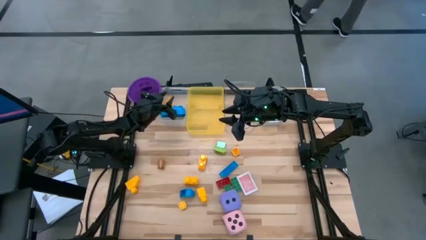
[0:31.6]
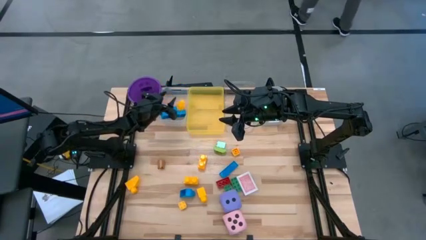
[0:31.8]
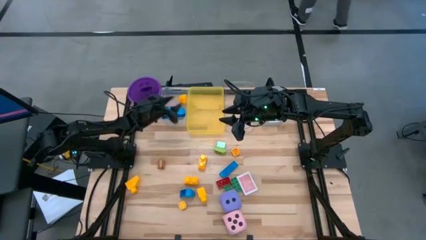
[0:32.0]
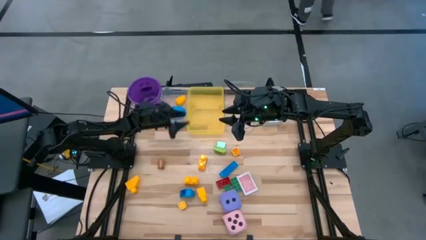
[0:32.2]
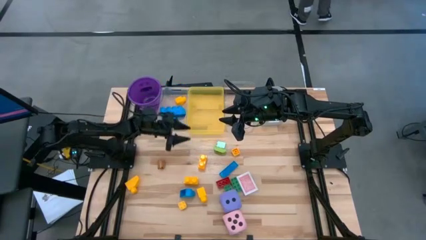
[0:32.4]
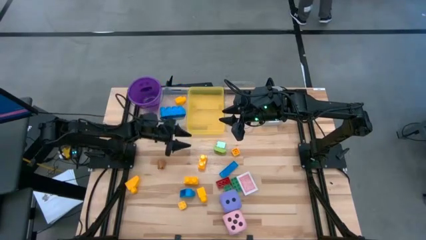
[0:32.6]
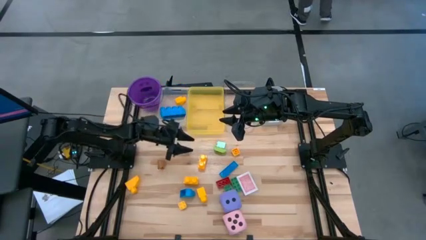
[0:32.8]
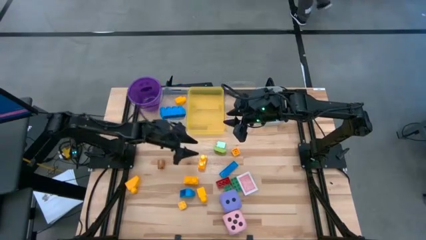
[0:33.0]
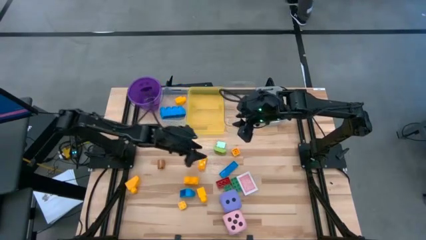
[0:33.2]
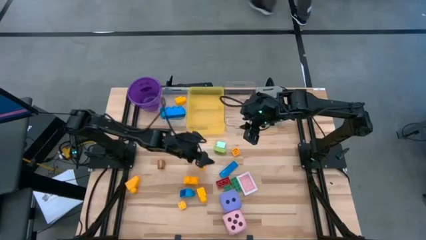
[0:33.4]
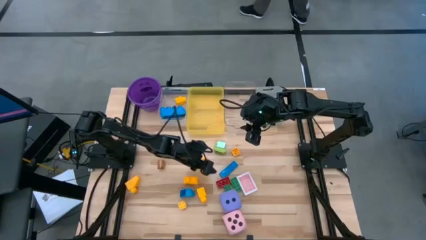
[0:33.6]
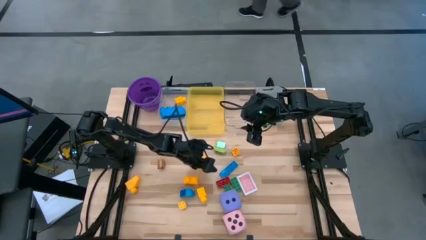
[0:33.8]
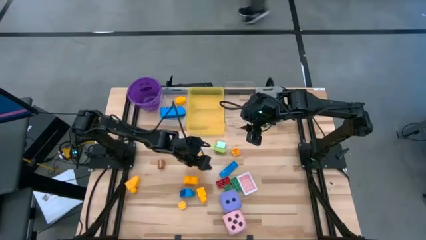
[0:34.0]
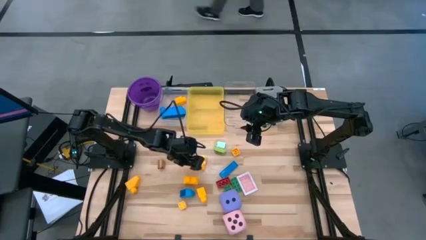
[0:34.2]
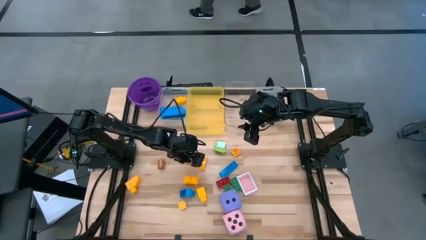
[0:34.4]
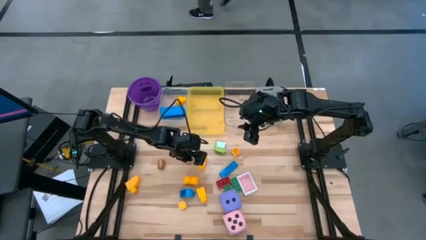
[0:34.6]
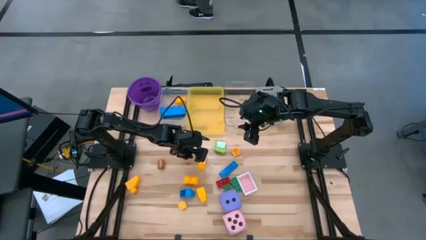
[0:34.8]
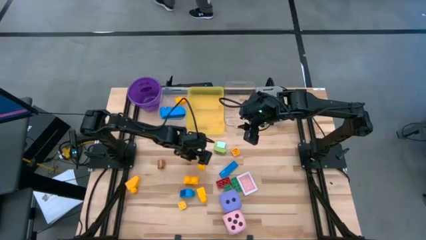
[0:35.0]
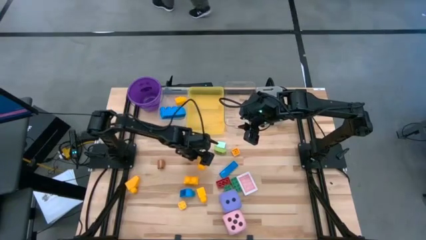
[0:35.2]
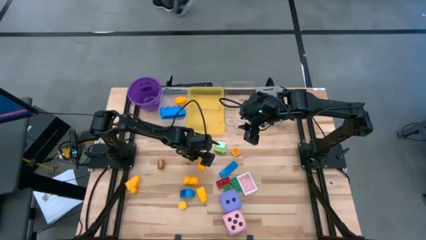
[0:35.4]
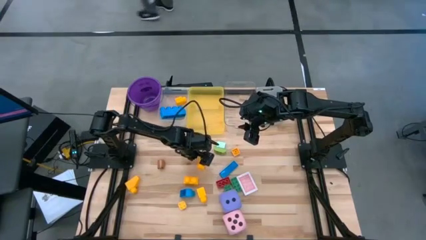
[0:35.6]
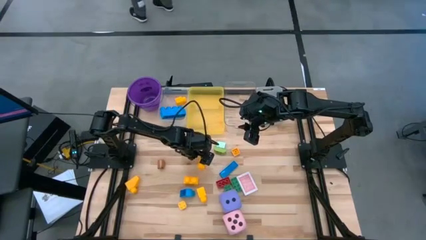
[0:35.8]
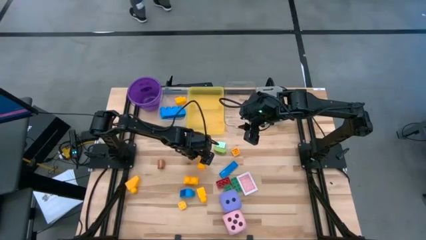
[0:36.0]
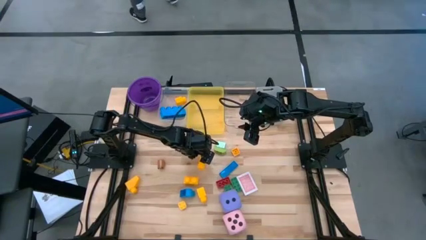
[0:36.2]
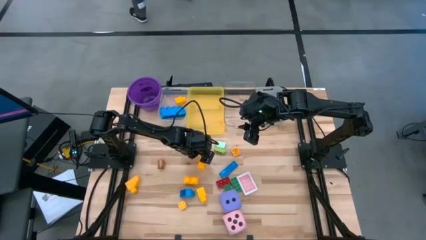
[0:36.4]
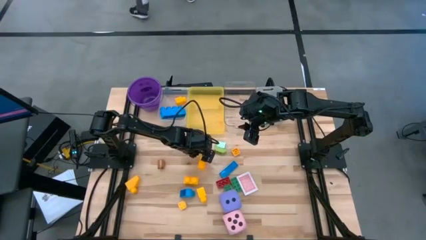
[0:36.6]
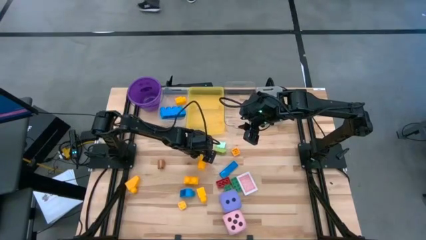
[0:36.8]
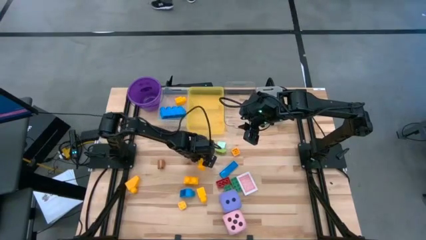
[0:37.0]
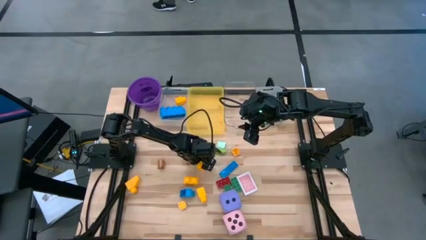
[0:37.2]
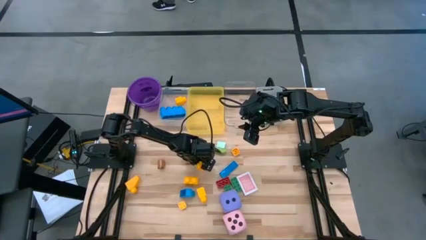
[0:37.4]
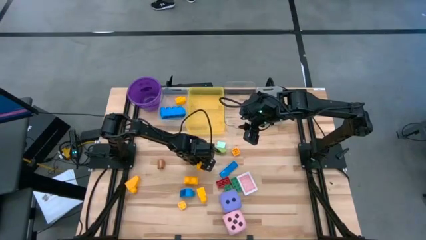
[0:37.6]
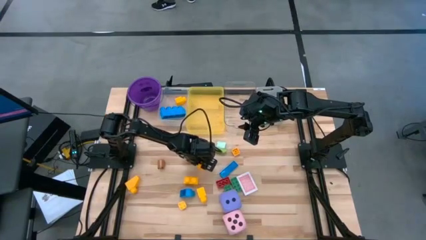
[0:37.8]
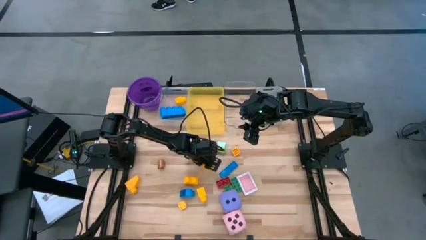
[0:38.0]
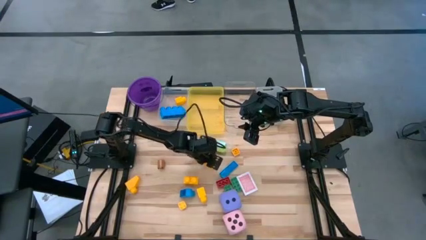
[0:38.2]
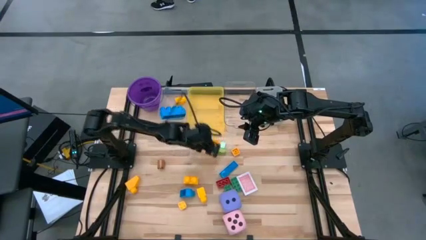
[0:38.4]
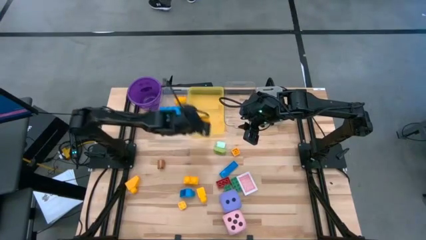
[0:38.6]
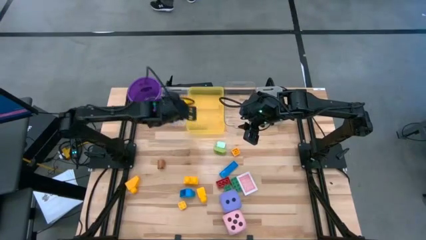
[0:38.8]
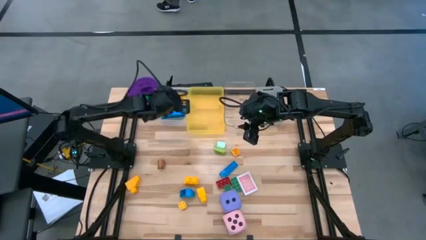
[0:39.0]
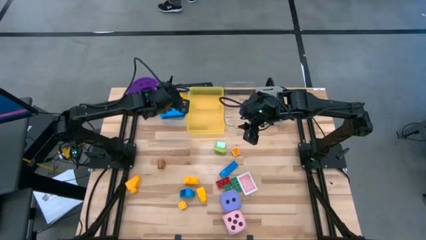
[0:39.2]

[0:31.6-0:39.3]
Task: Pick & Place Toys
Put the big yellow game piece into the white bin

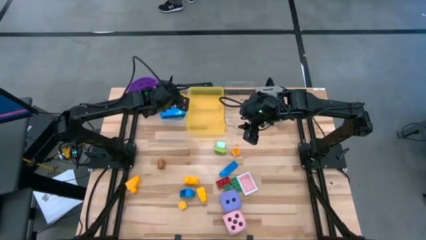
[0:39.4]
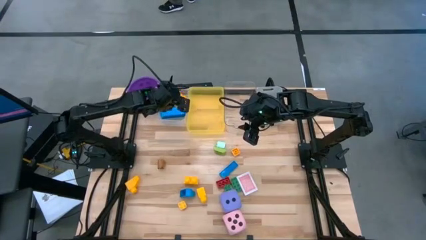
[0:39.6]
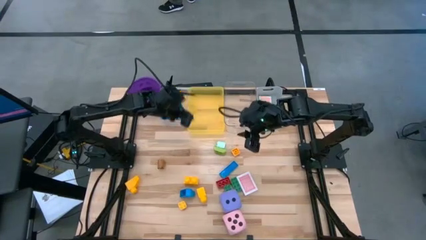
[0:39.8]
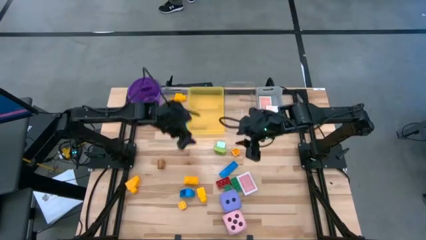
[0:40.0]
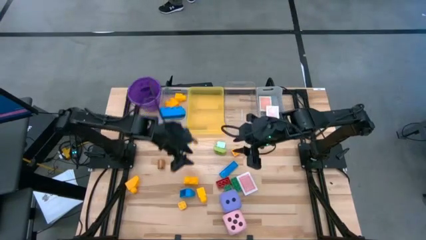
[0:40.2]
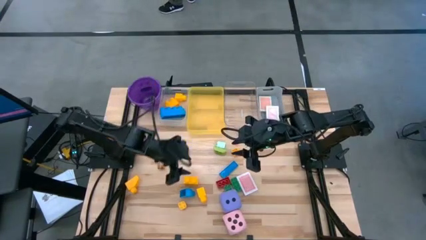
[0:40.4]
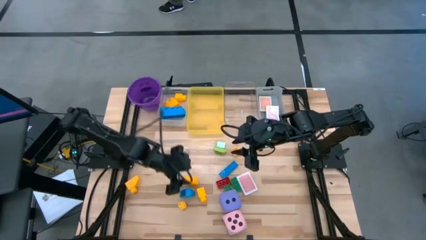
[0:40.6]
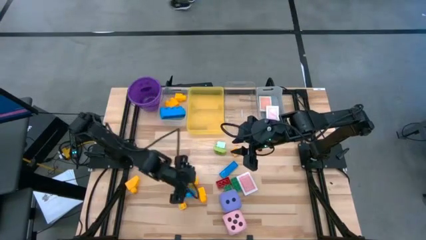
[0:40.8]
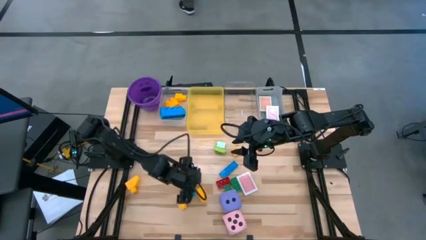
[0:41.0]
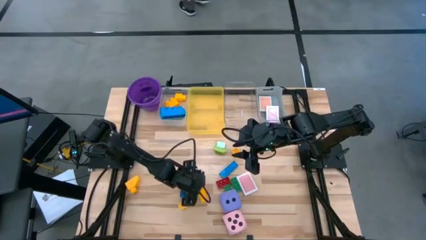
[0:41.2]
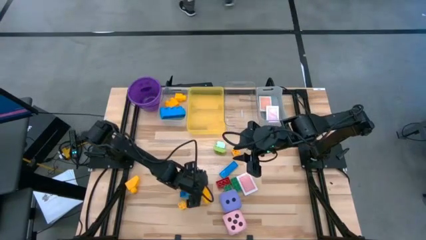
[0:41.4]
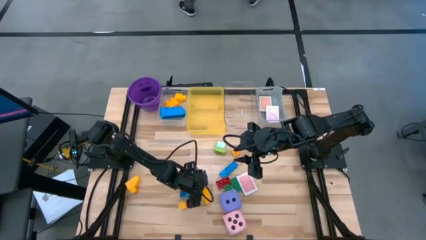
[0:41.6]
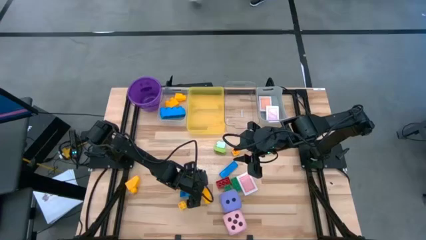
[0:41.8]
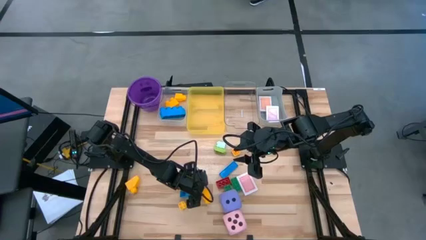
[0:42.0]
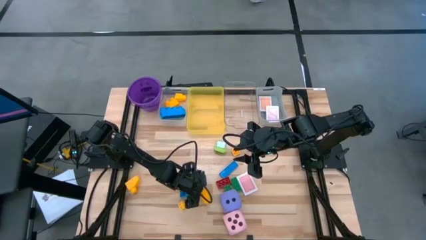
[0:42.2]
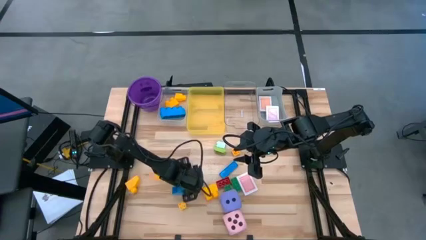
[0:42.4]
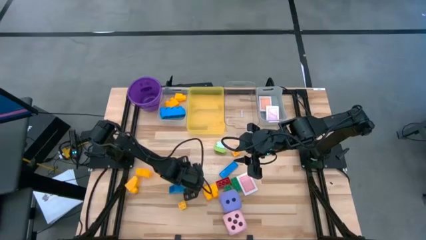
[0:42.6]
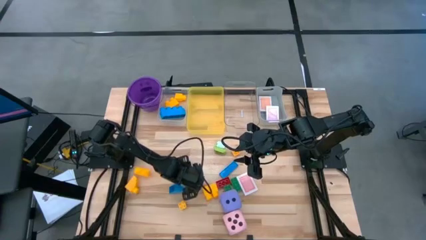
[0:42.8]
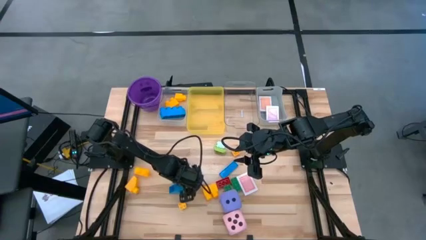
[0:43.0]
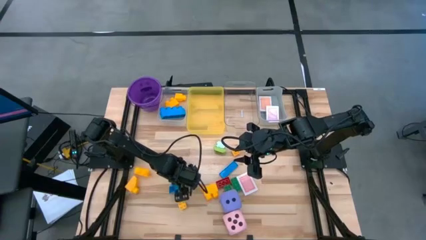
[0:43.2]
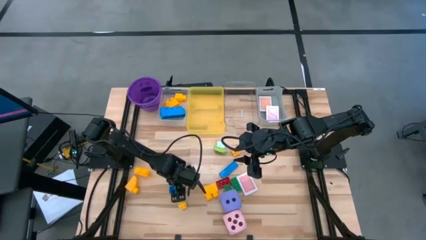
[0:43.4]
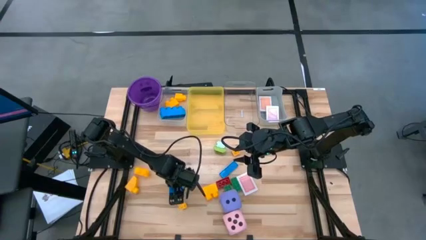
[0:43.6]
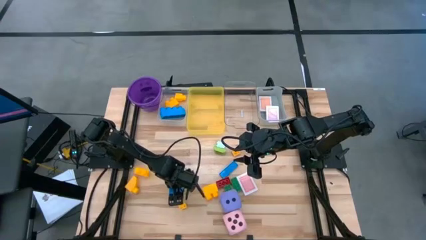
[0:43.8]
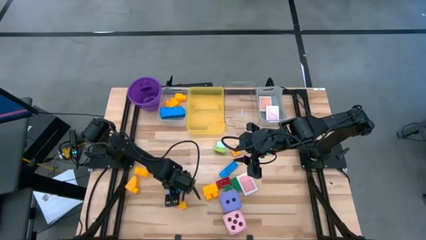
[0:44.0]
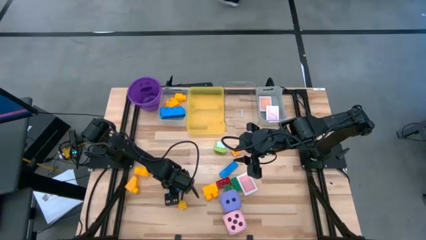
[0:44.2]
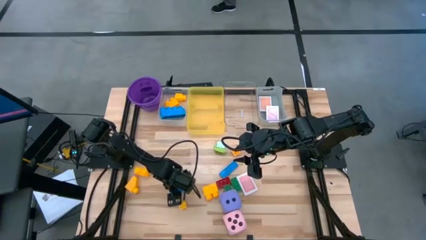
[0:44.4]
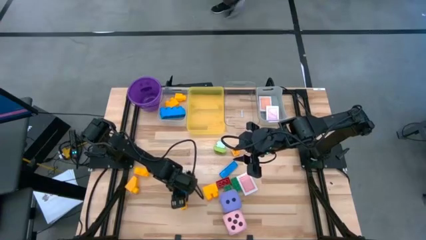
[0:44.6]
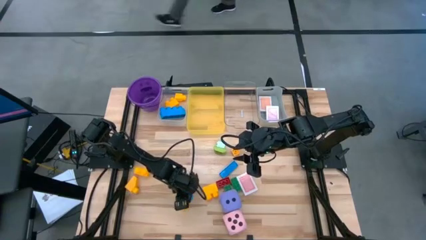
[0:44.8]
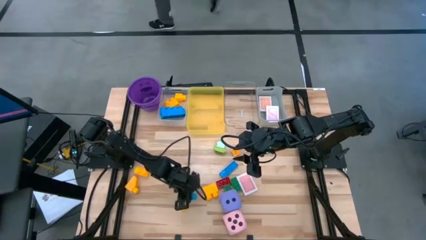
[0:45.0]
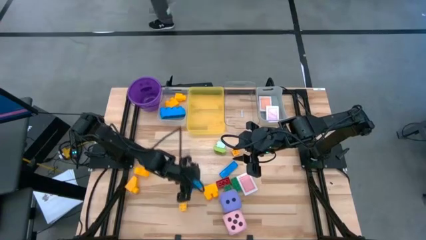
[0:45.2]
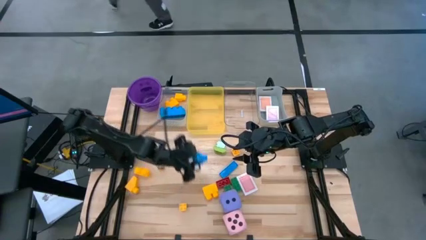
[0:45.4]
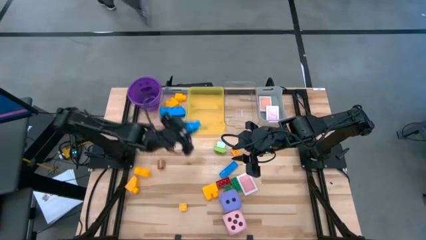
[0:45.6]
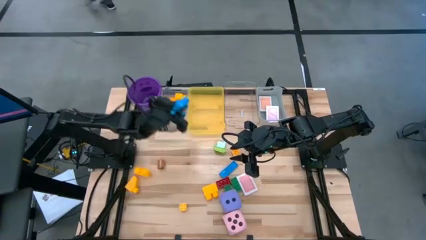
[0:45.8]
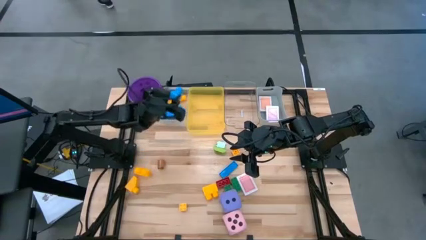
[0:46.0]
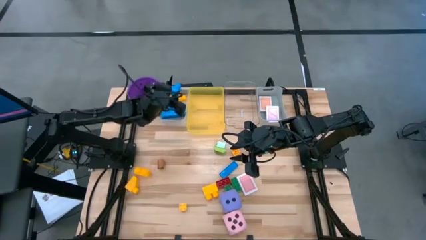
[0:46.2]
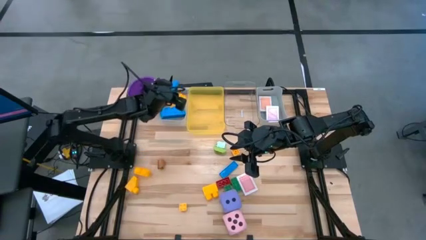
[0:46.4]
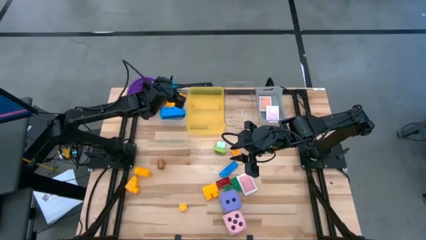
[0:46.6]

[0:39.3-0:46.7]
Put the big blue game piece into the white bin
